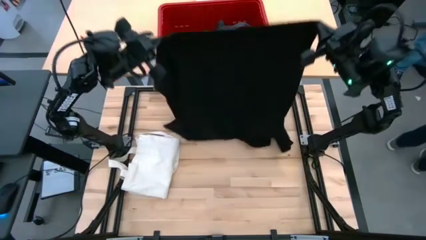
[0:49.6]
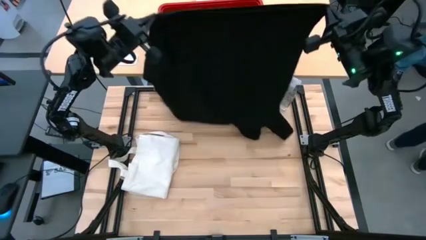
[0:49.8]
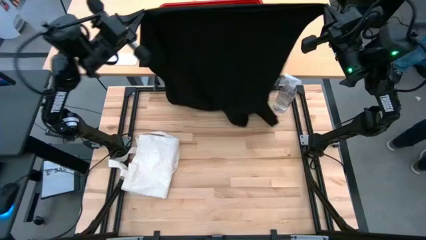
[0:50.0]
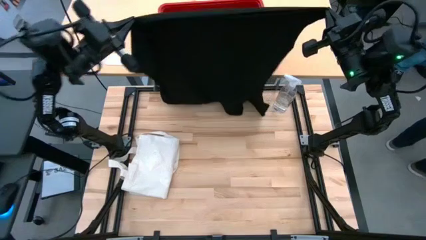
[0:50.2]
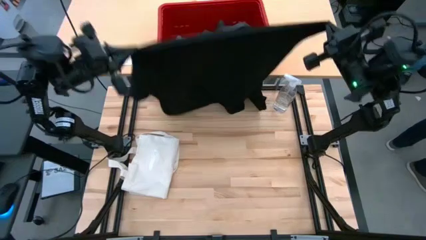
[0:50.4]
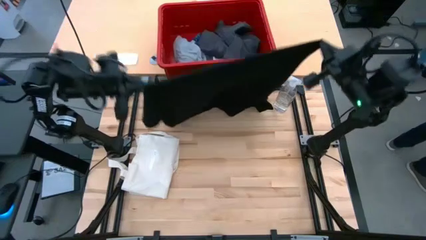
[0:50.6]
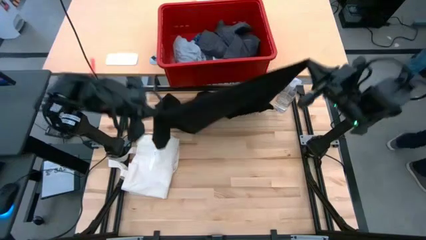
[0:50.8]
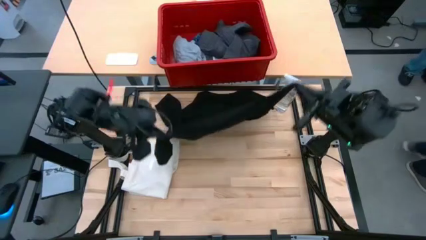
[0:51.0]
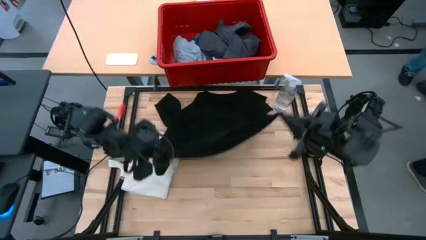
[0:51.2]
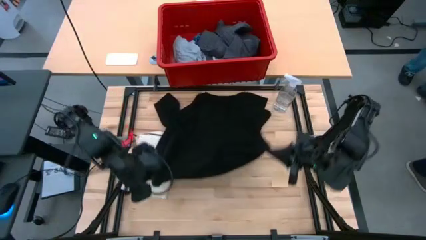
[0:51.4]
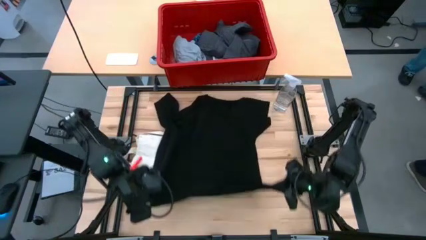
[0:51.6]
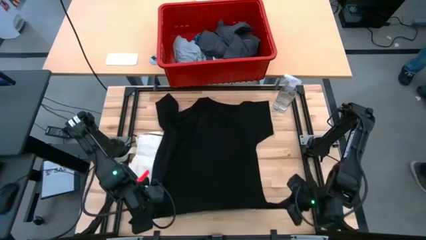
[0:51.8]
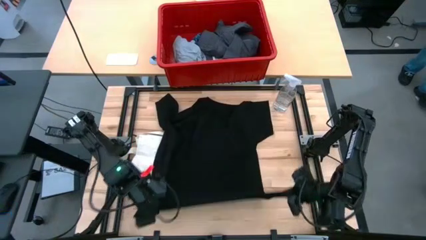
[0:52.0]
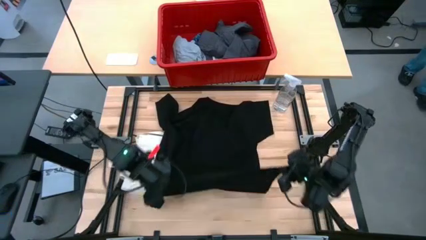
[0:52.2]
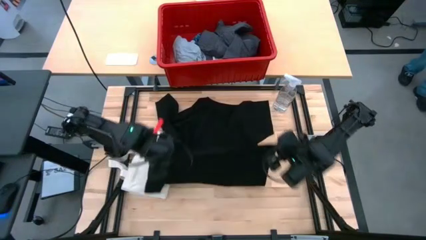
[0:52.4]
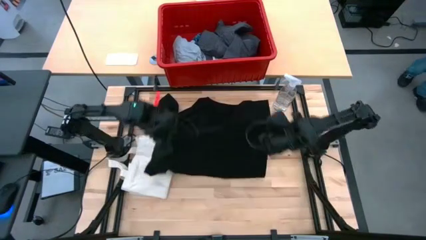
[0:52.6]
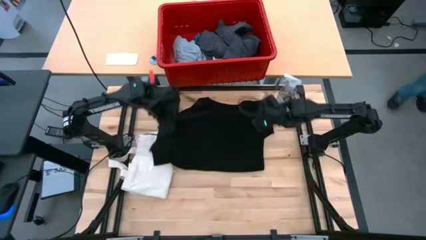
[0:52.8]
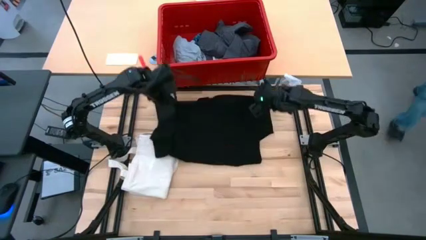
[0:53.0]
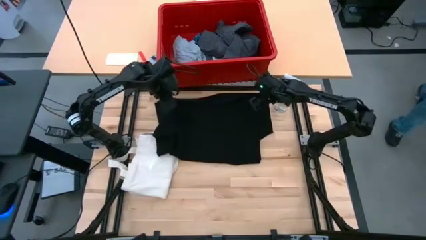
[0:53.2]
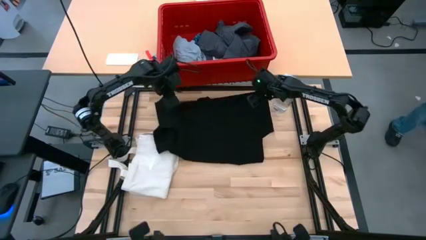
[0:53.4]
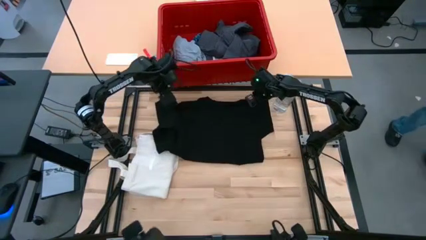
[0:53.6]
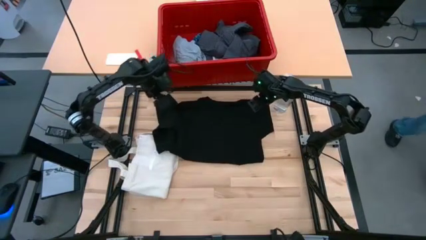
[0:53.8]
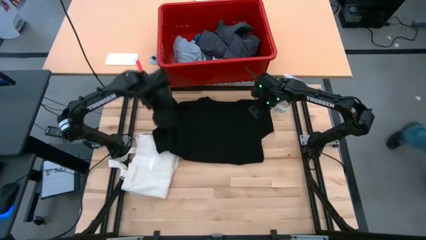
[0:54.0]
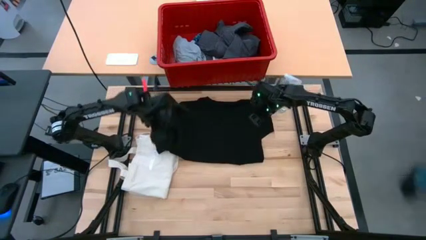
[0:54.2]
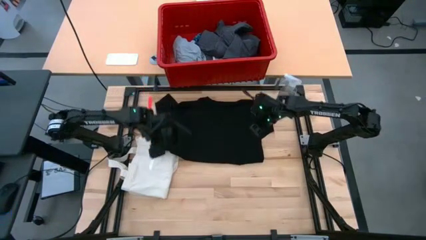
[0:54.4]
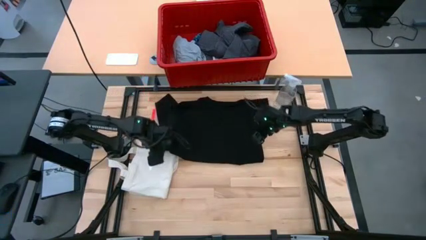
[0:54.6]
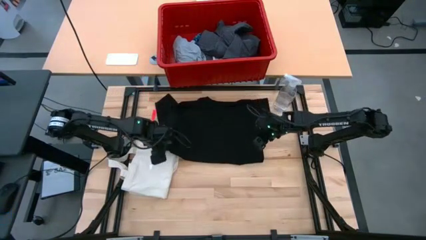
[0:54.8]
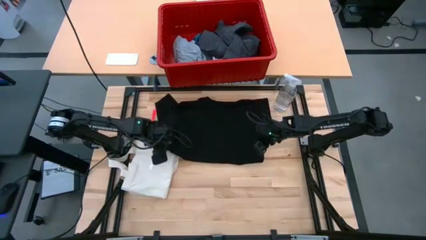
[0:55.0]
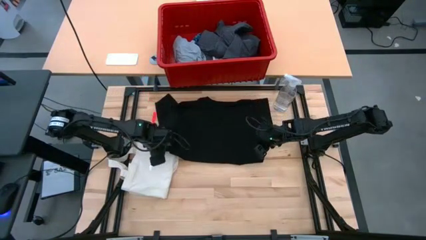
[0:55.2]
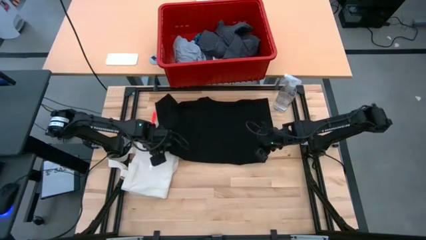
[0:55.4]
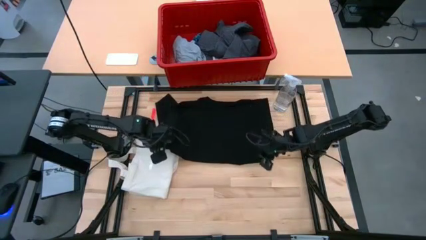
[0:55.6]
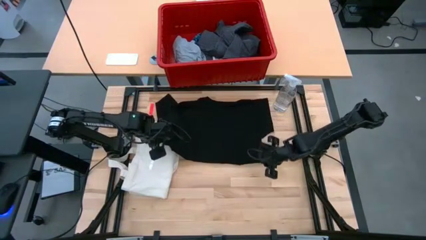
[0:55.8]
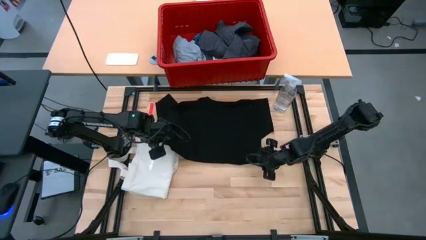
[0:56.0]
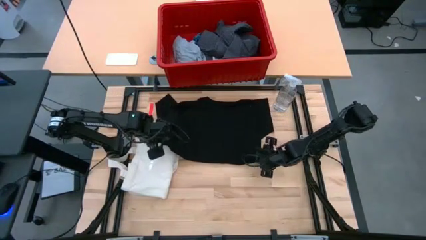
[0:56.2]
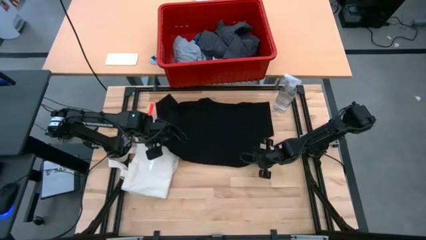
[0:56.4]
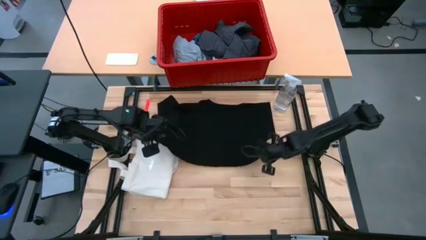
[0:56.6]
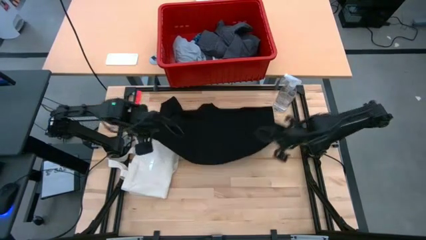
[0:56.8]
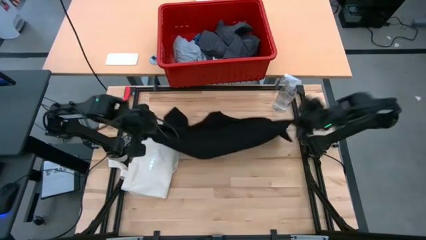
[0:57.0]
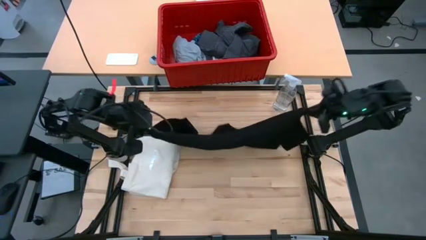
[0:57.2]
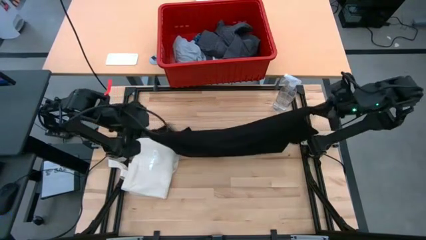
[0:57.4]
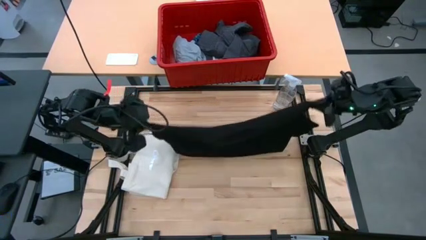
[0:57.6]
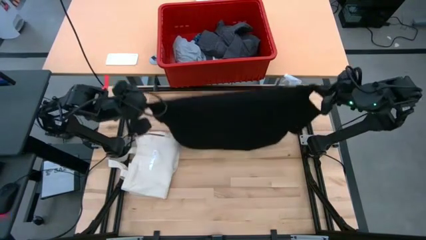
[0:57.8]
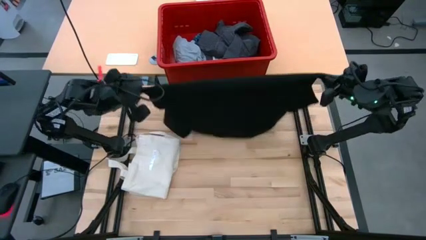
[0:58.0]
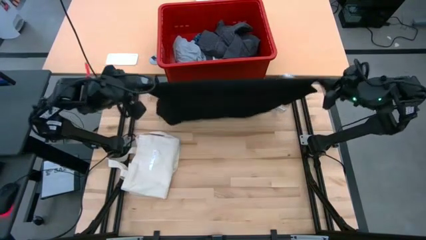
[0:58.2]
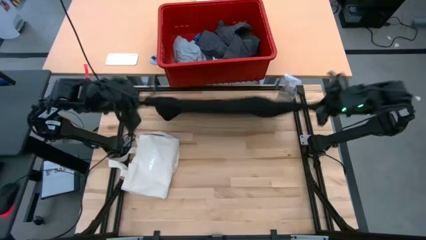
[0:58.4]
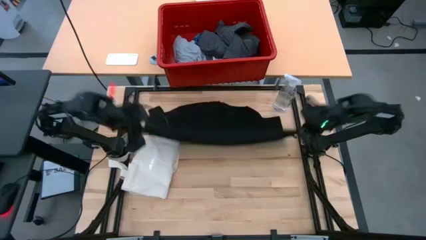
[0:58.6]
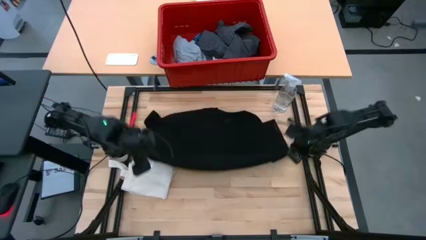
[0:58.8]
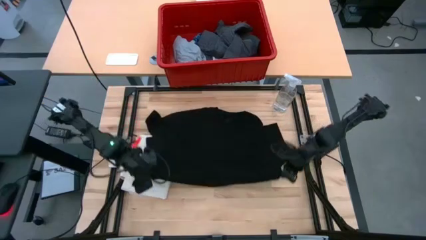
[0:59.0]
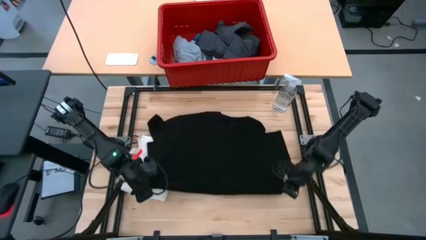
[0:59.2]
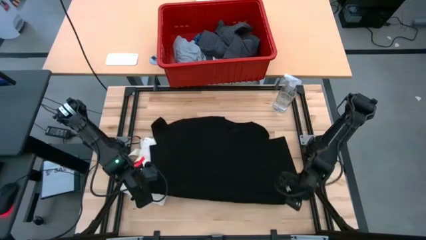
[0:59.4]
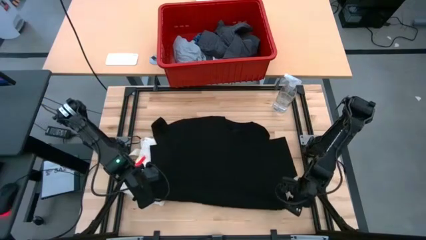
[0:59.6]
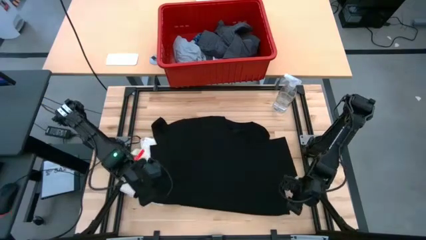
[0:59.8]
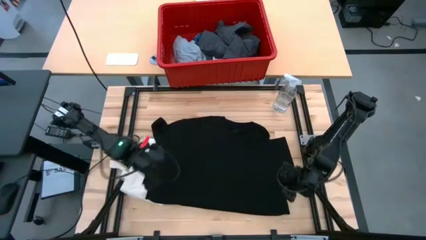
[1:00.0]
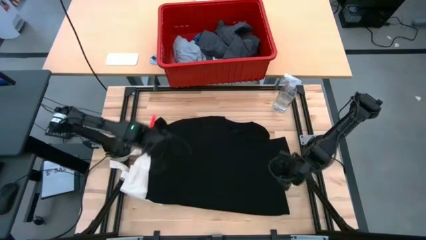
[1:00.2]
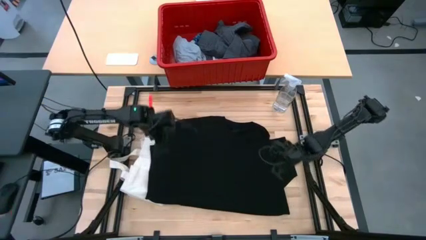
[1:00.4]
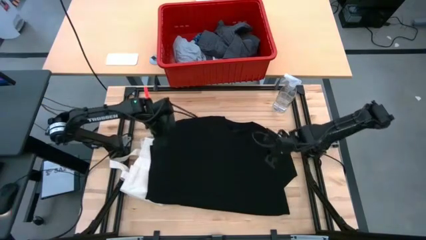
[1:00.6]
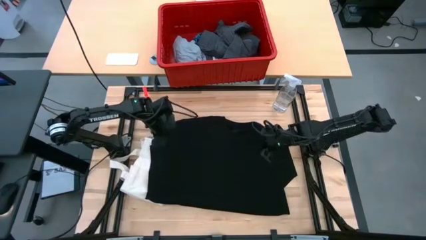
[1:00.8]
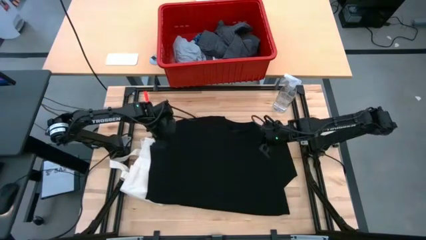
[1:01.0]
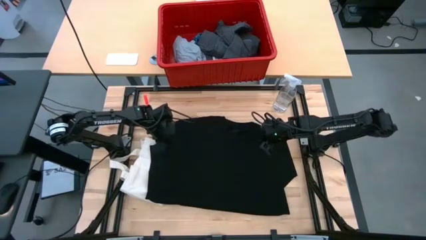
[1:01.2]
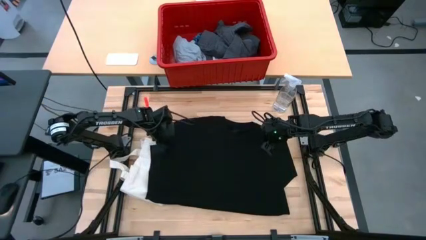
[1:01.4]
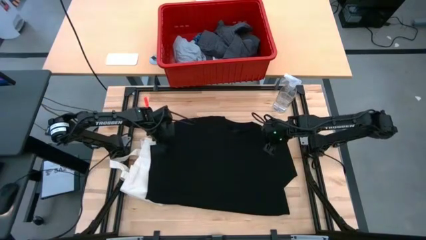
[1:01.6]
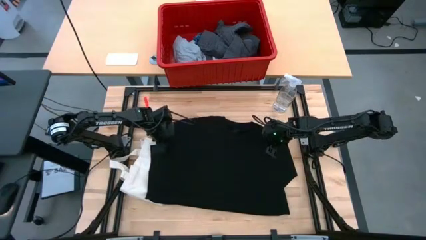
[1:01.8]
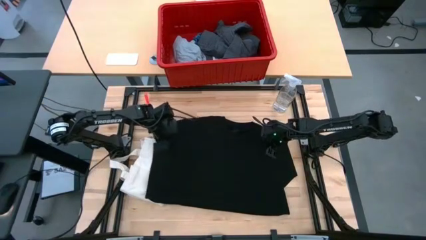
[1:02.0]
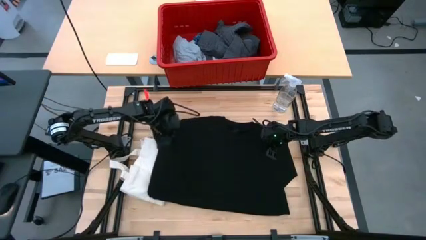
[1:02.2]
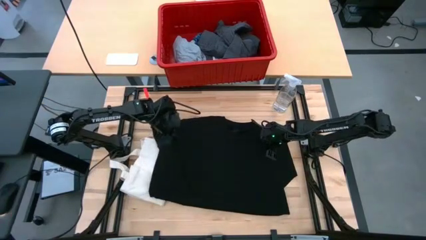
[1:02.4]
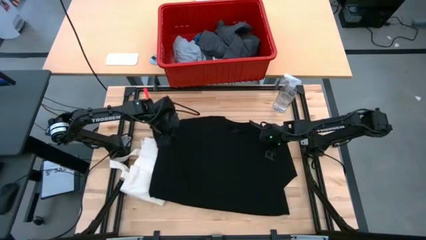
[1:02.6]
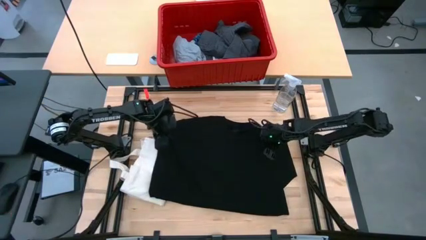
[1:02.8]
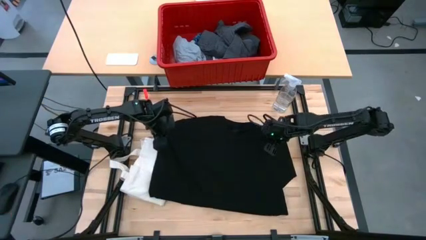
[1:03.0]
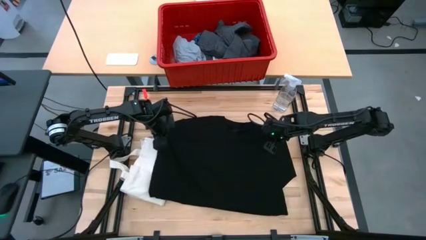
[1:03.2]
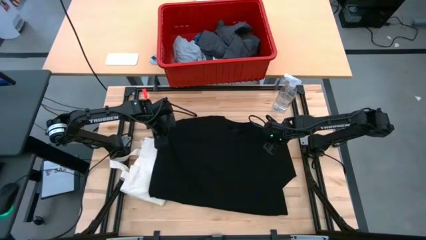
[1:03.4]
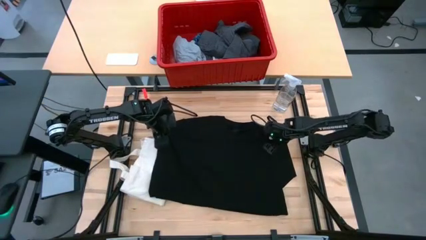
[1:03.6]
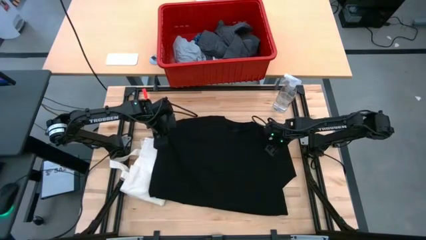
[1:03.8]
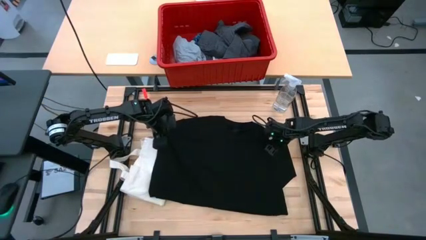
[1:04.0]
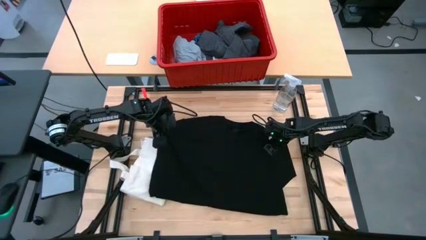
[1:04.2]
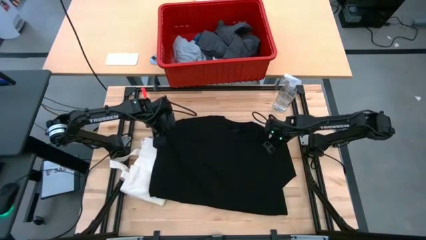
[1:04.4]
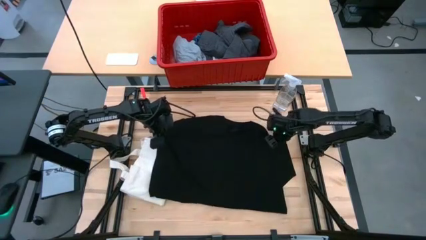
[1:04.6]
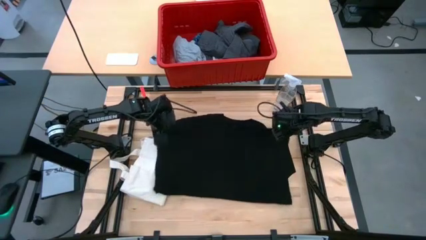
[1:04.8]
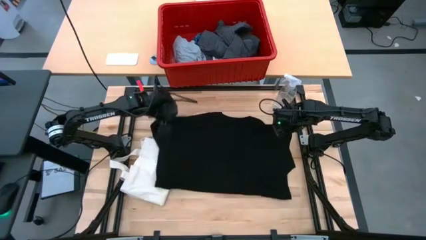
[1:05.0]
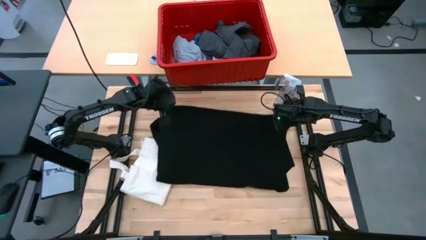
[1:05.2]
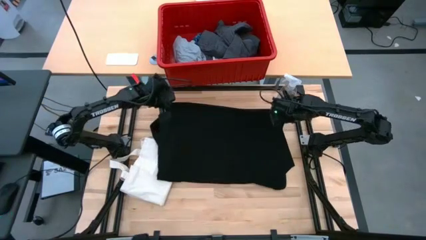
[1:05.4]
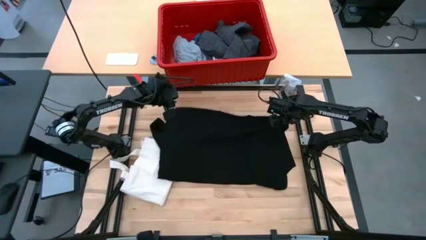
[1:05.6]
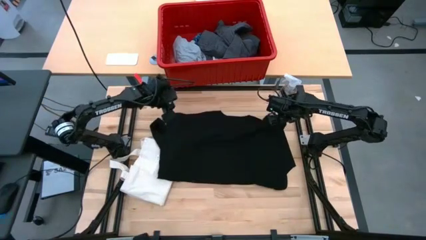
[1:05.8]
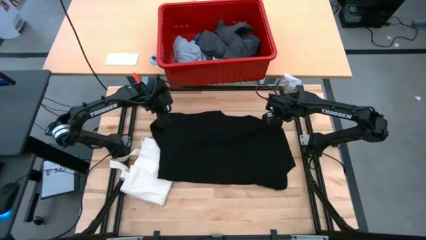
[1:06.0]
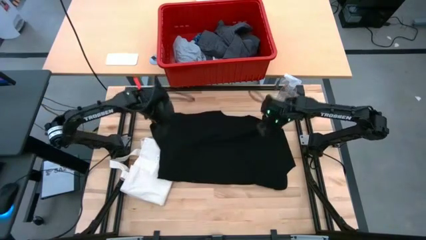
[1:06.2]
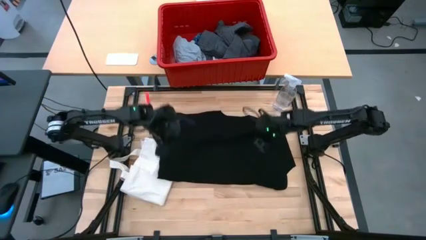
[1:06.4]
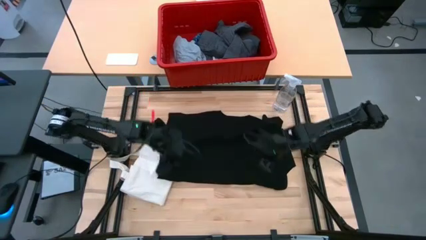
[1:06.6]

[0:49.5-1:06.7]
Task: Fold Laundry from Bin
Fold the black shirt
